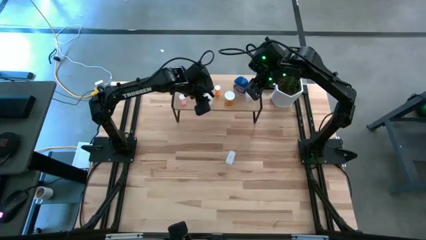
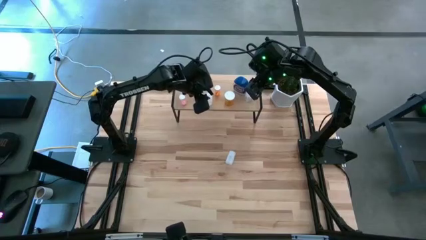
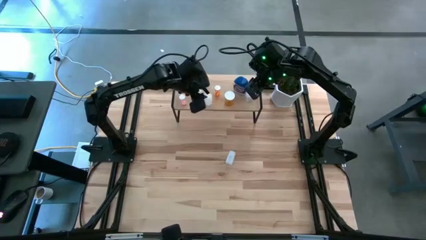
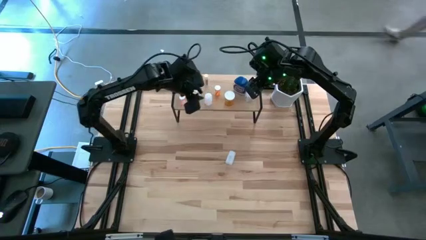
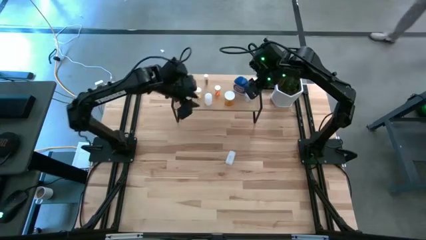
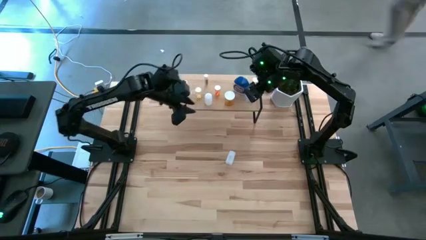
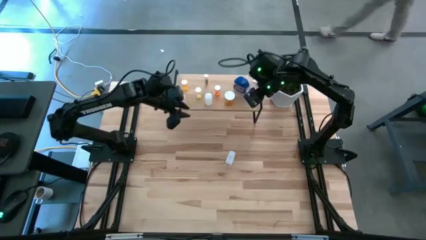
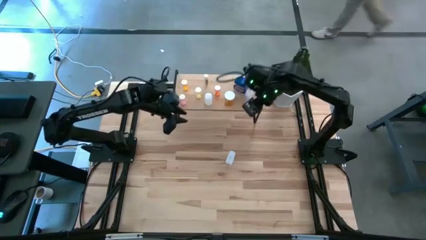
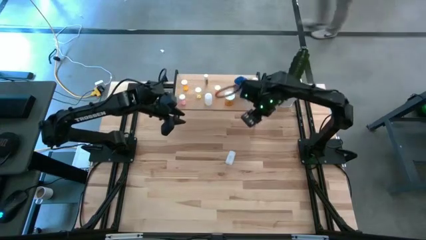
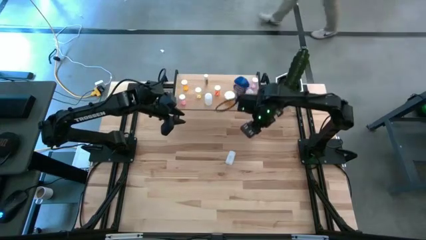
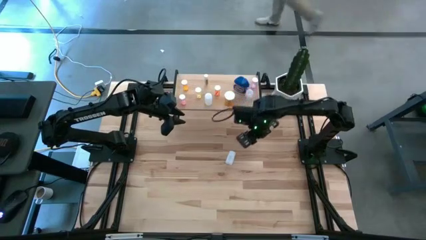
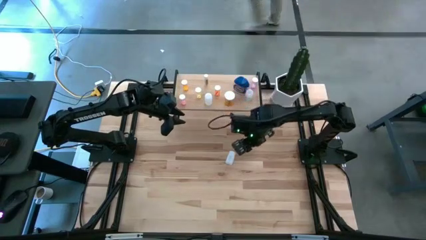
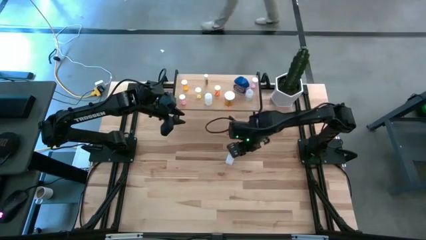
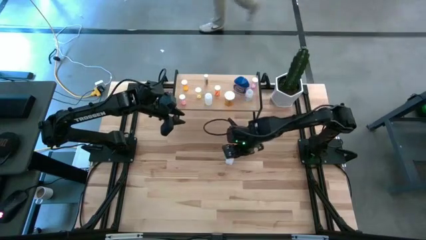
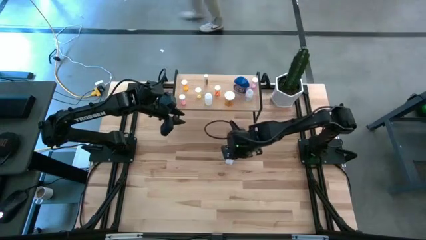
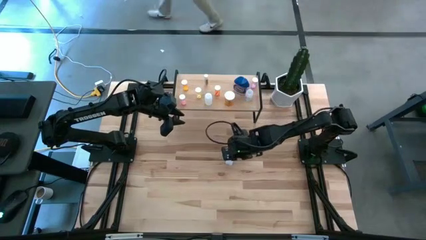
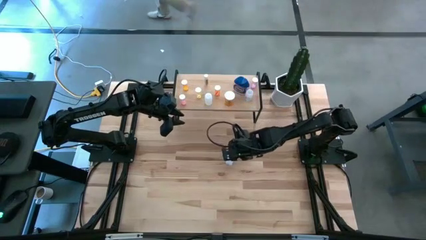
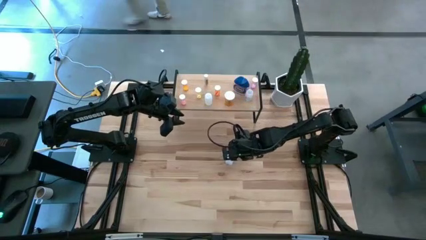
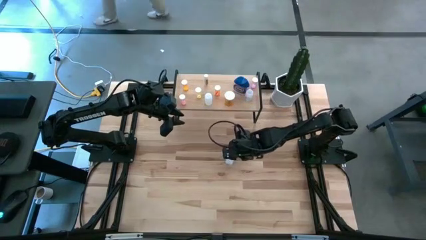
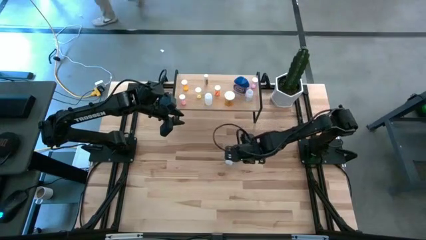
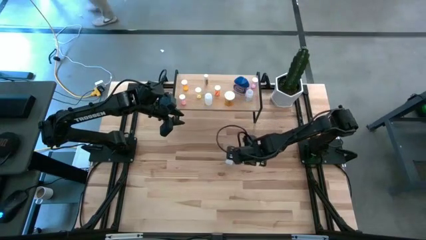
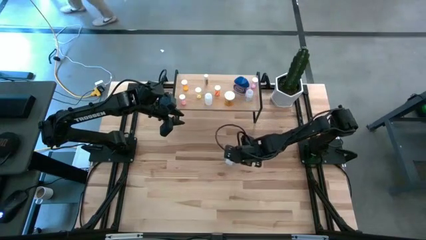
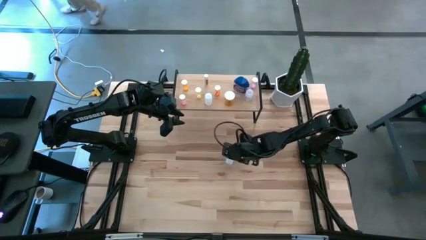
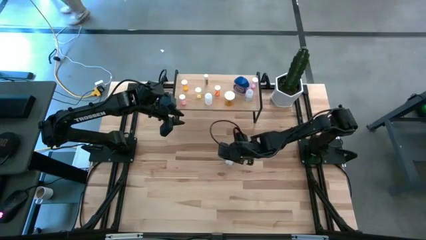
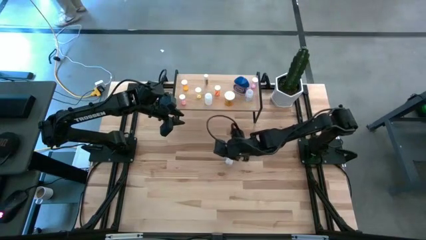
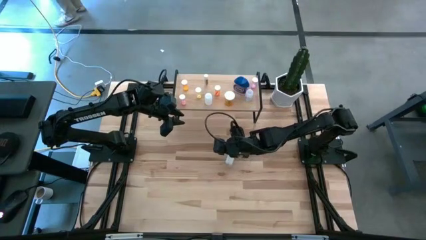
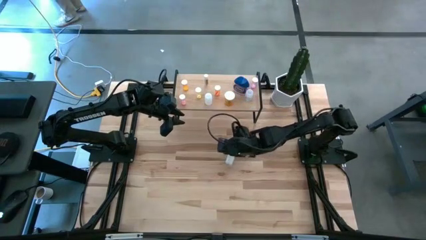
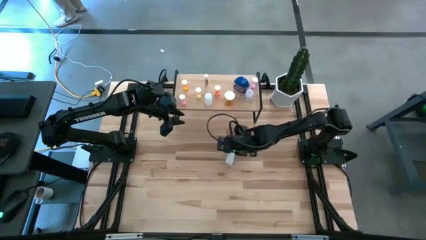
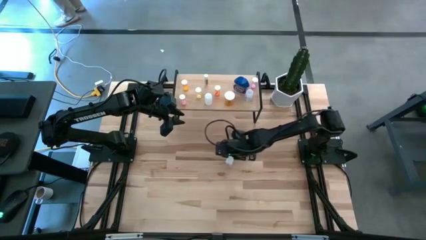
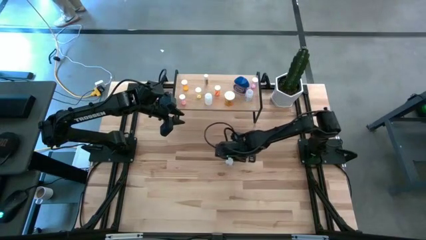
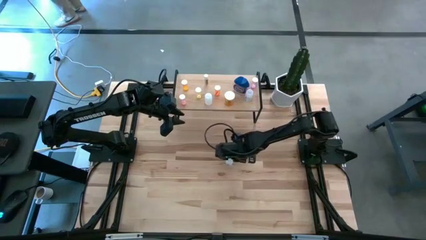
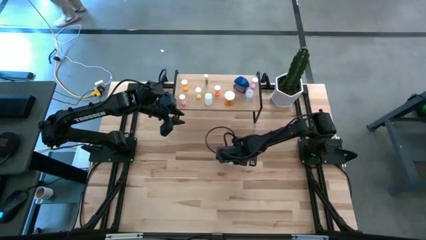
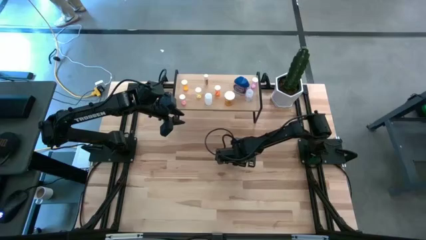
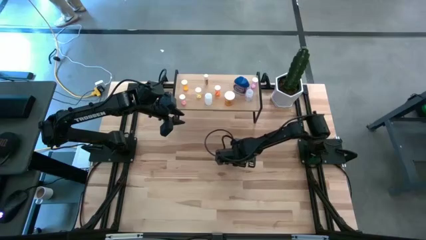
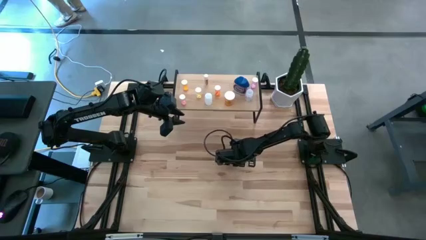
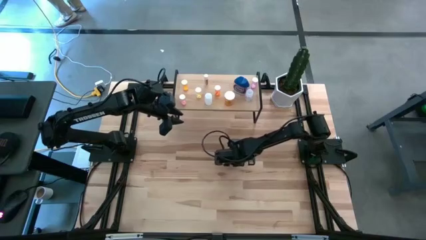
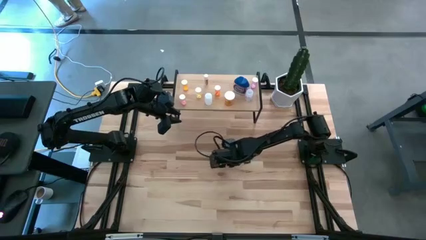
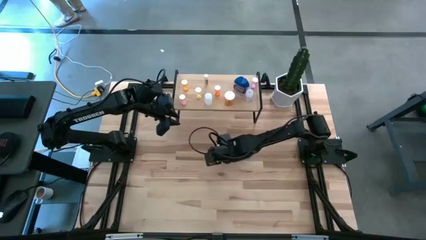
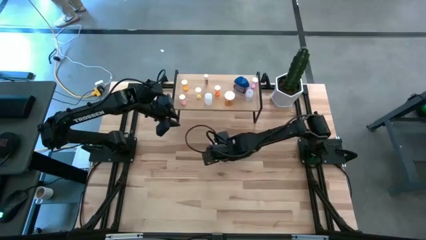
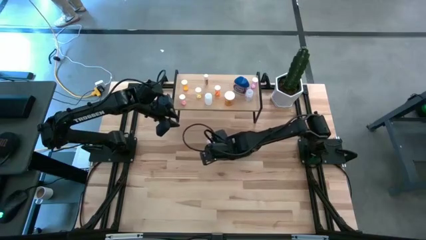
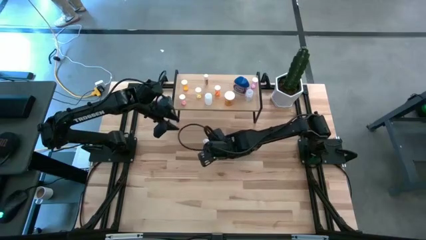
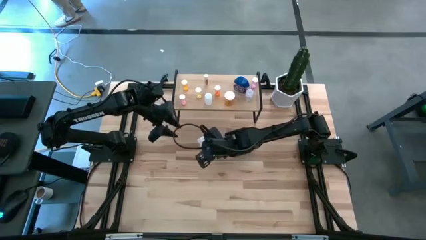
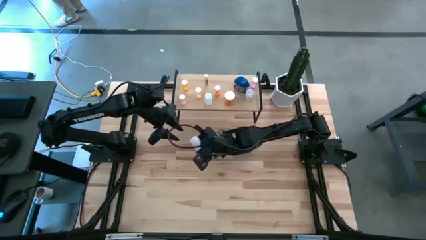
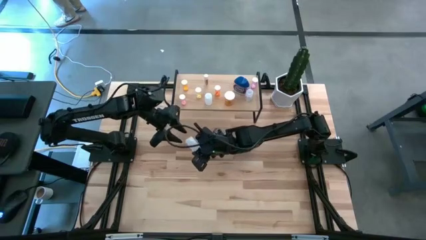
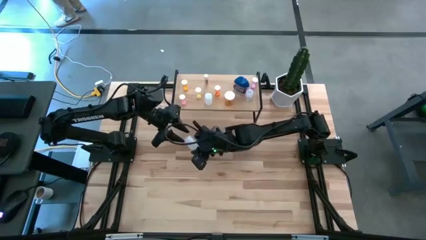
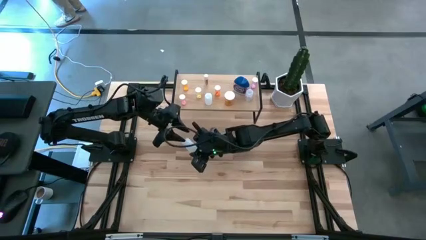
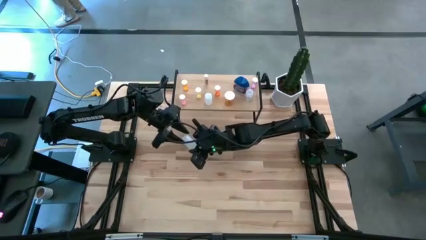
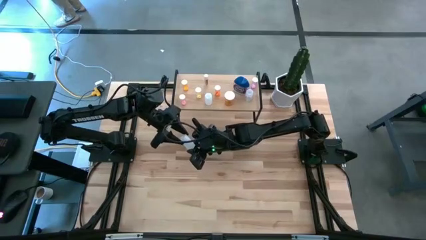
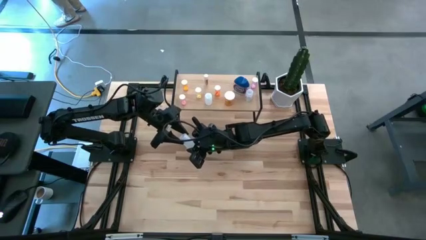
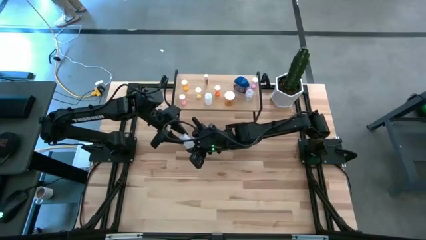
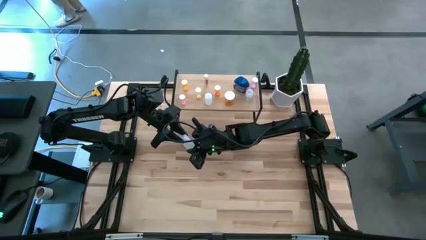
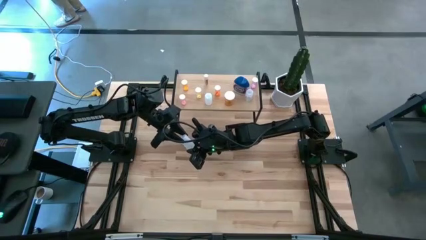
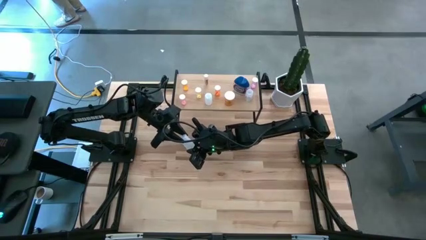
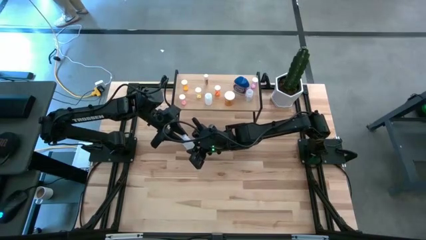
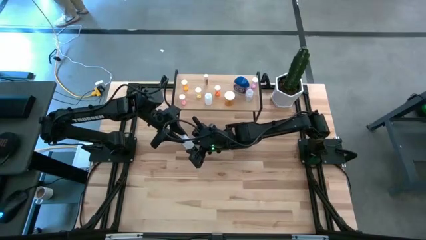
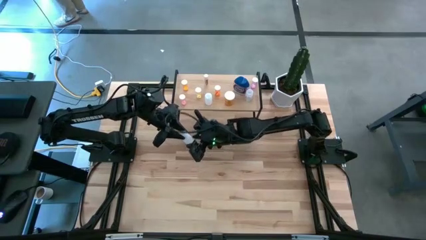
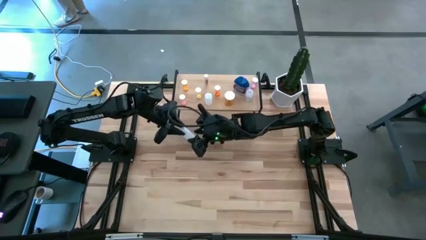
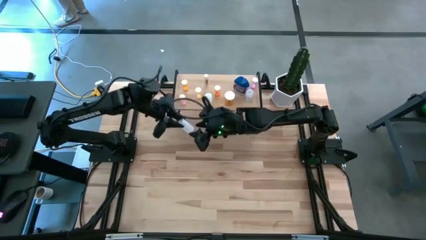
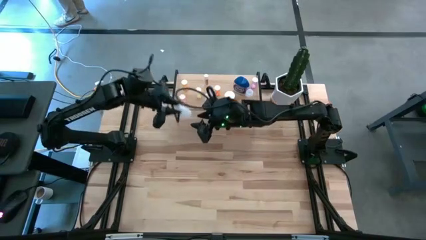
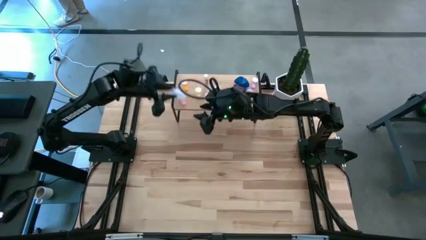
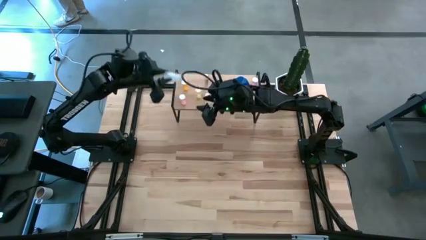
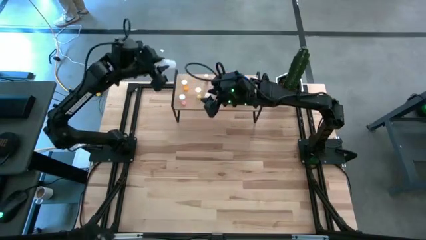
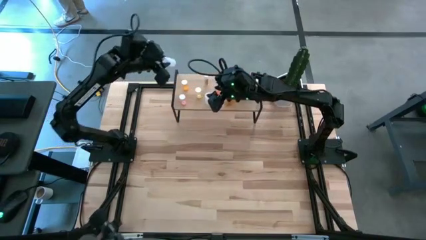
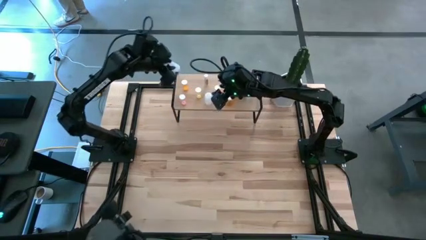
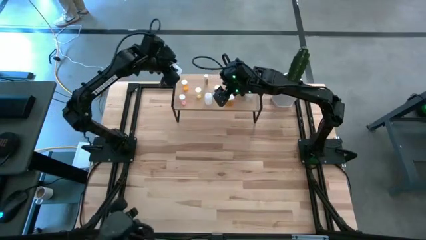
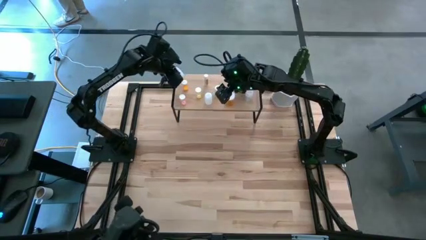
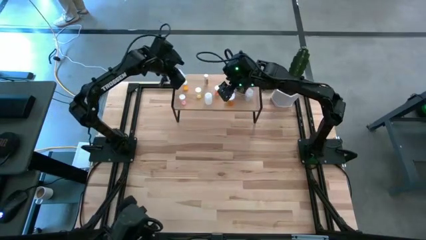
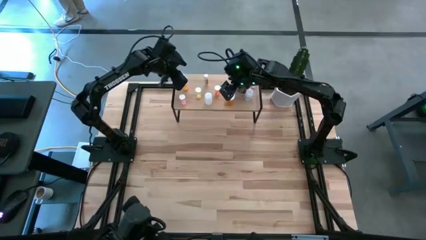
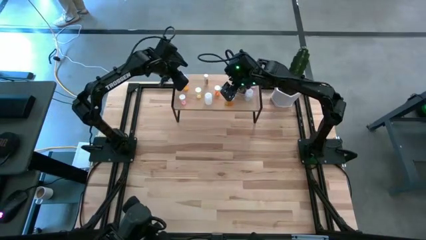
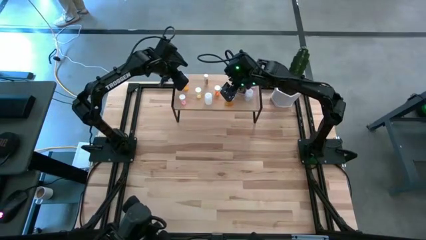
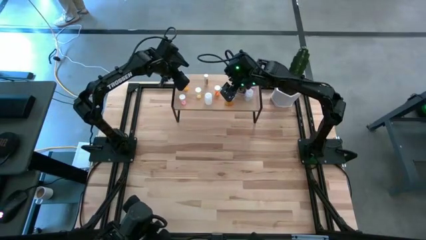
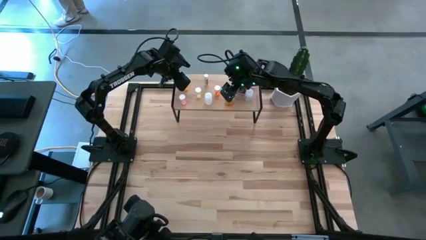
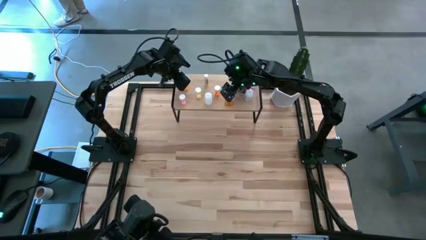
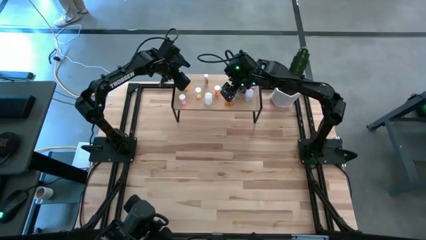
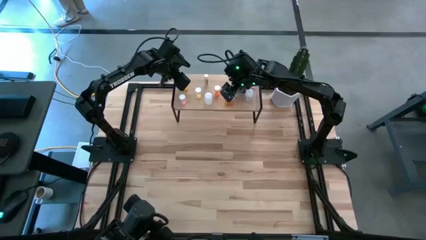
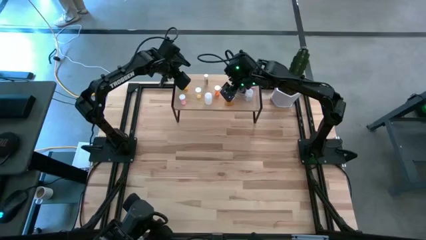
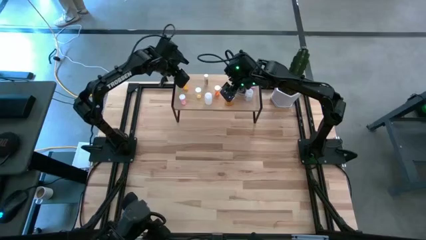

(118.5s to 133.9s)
Task: Pick and place medicine bottles onto shelf by color
Put the transparent pill bottle on the shelf

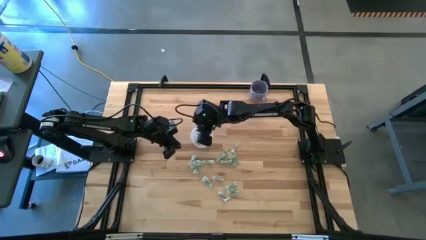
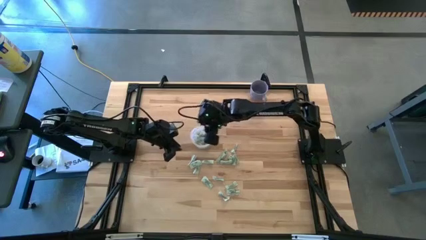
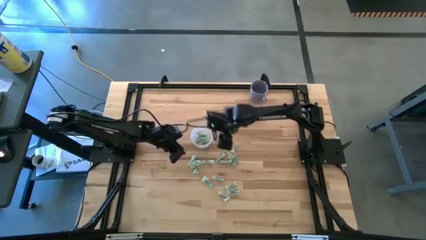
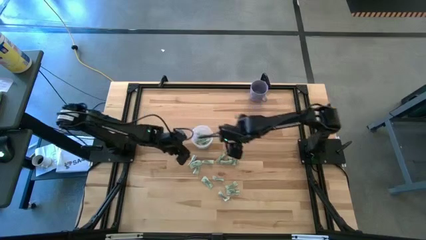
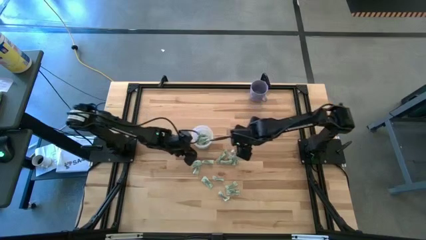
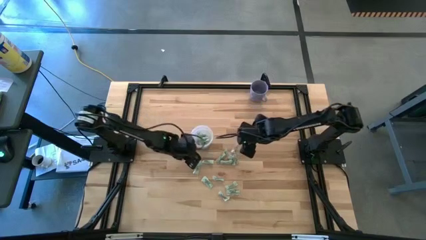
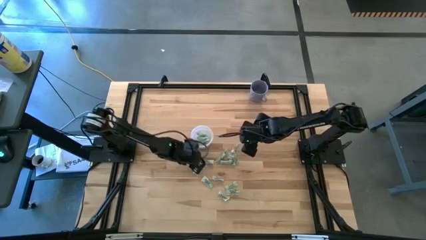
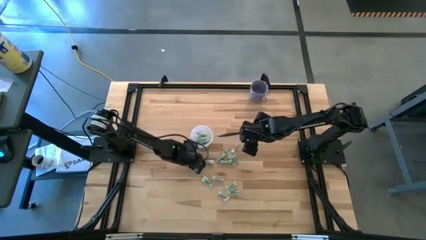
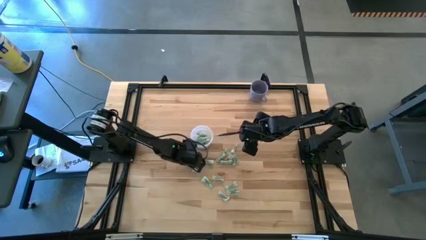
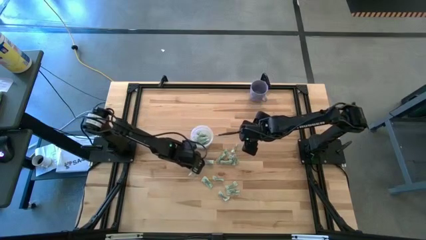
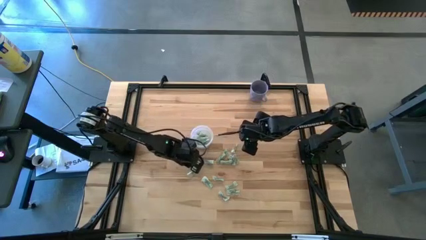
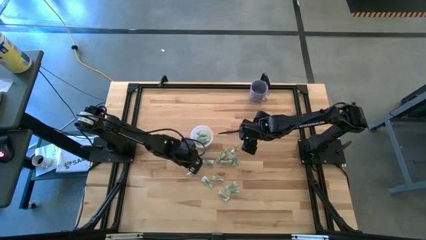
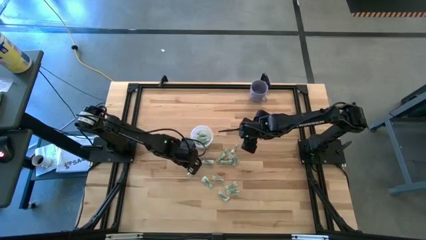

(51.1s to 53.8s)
Task: Pick and place Stevia / Truvia into bins
Put the white stevia packet into the transparent container
